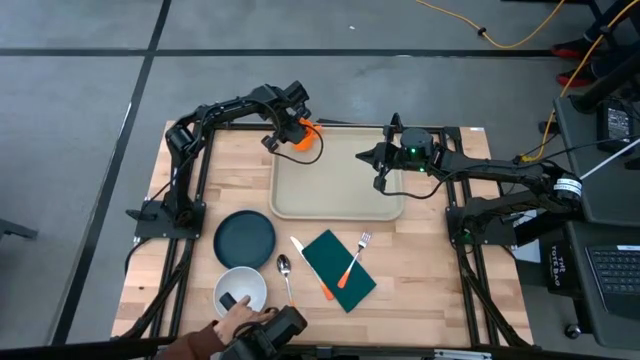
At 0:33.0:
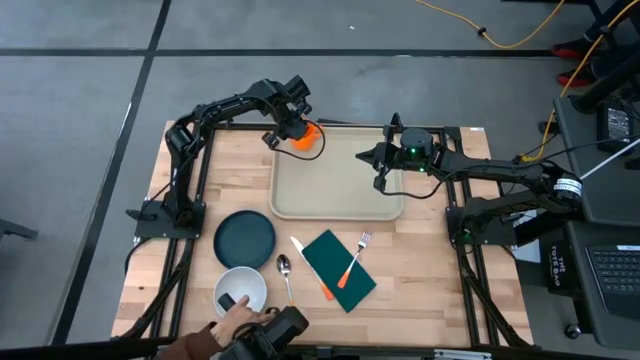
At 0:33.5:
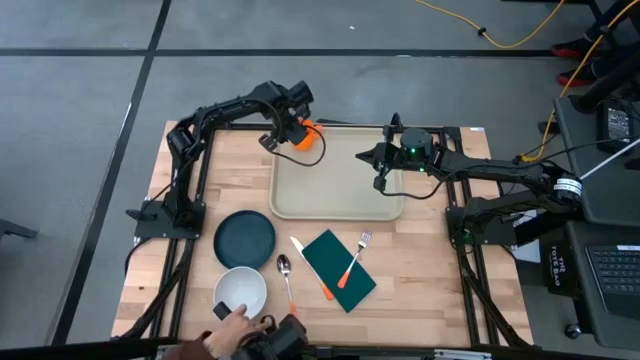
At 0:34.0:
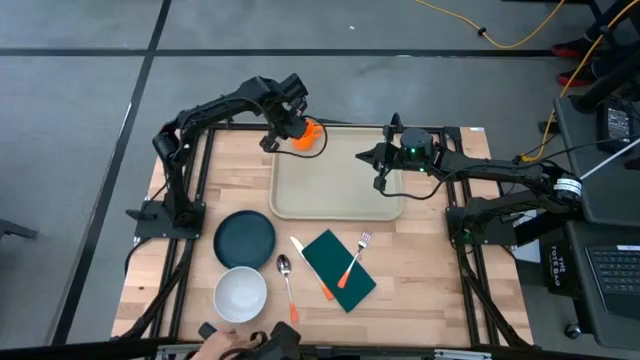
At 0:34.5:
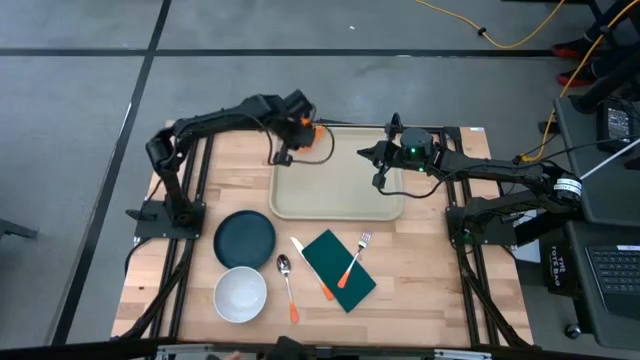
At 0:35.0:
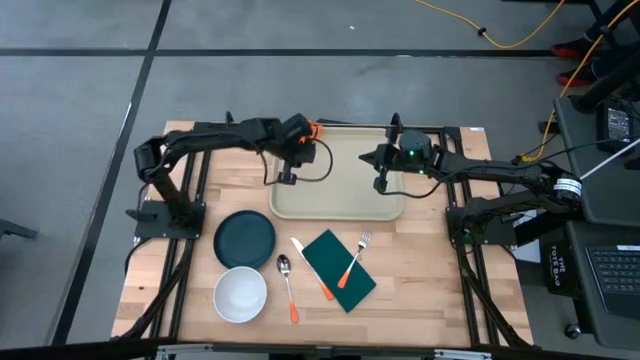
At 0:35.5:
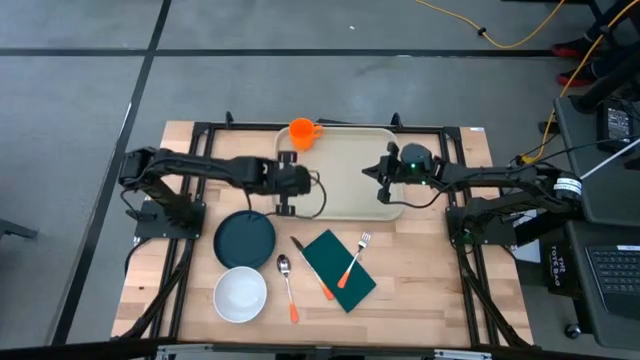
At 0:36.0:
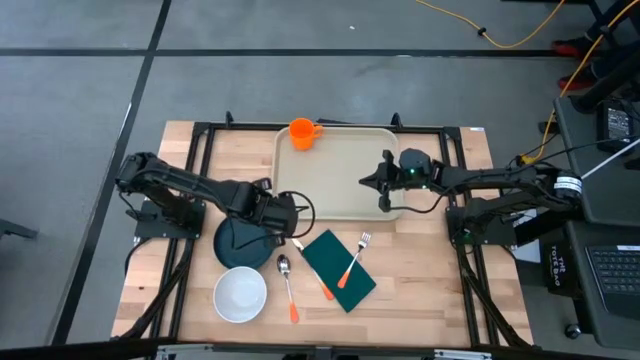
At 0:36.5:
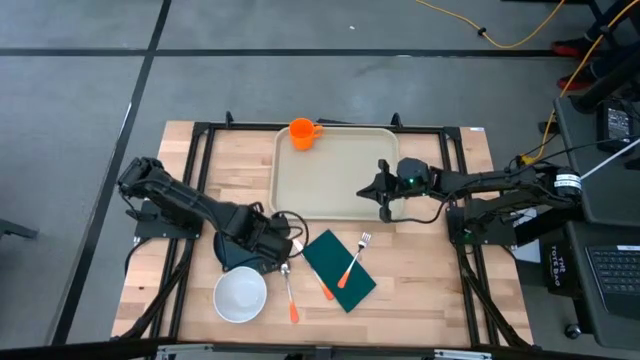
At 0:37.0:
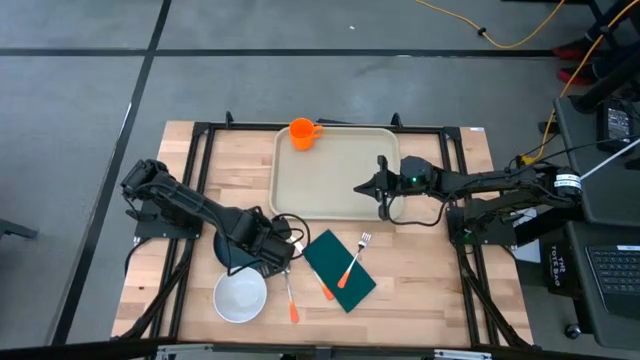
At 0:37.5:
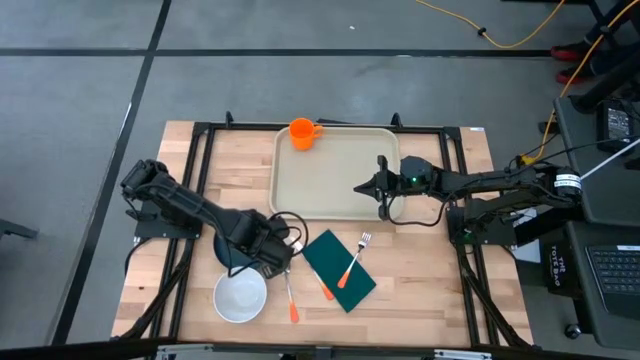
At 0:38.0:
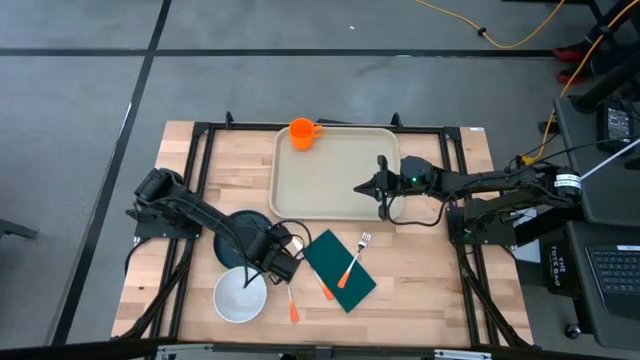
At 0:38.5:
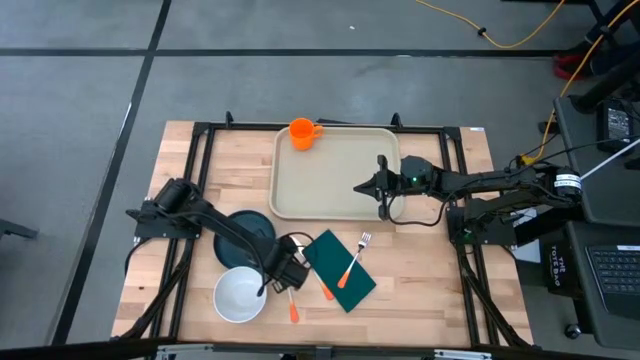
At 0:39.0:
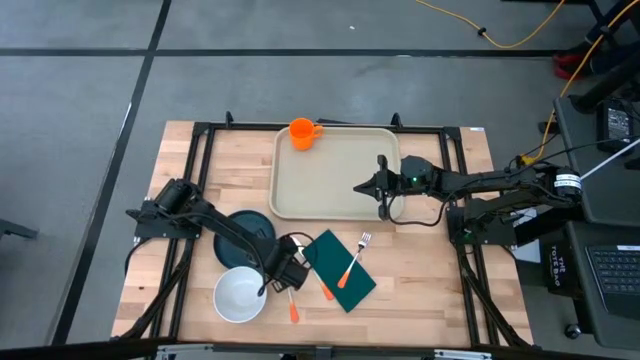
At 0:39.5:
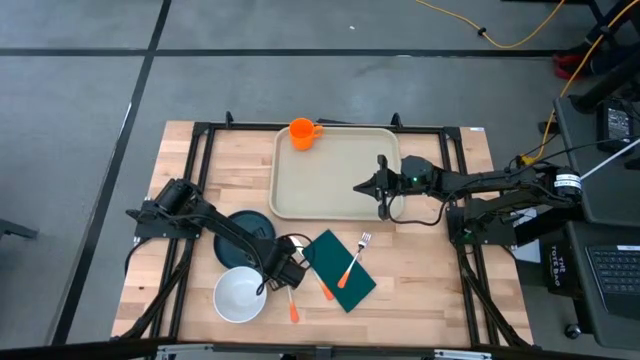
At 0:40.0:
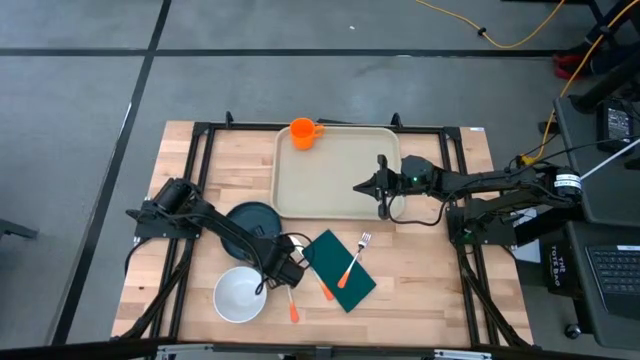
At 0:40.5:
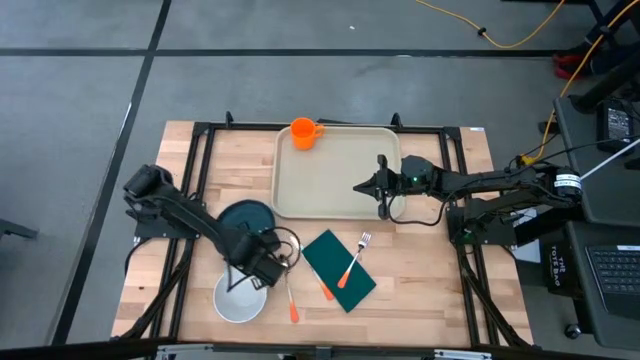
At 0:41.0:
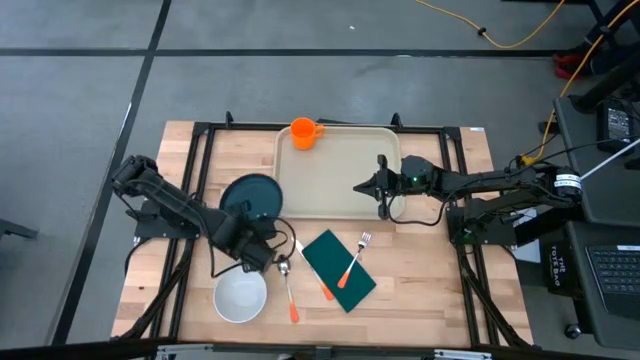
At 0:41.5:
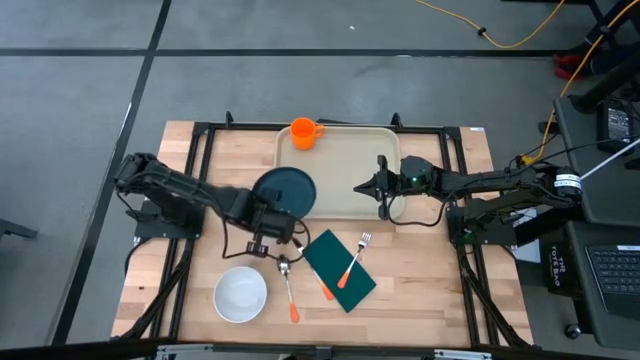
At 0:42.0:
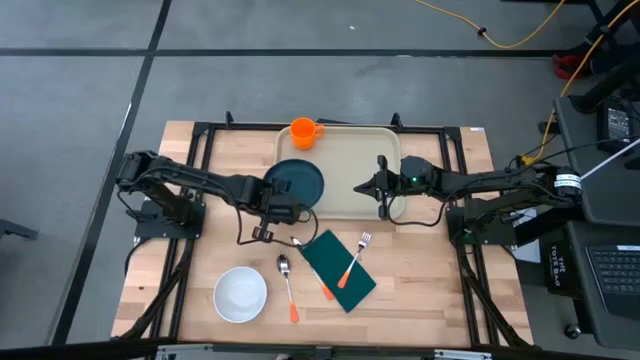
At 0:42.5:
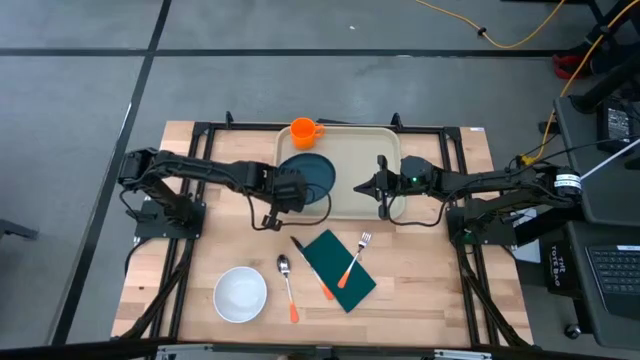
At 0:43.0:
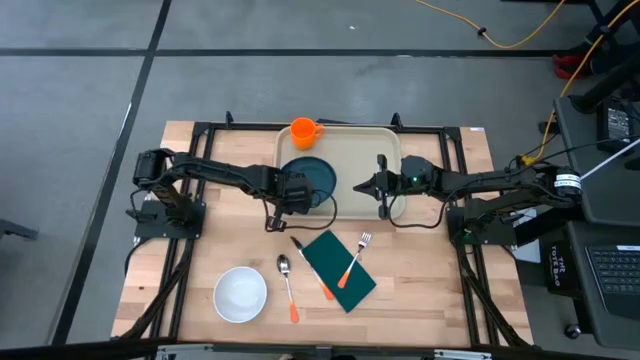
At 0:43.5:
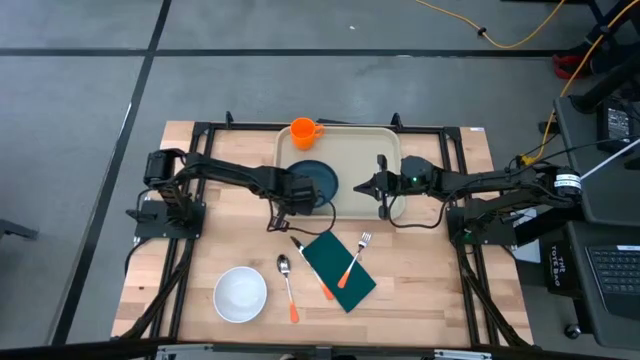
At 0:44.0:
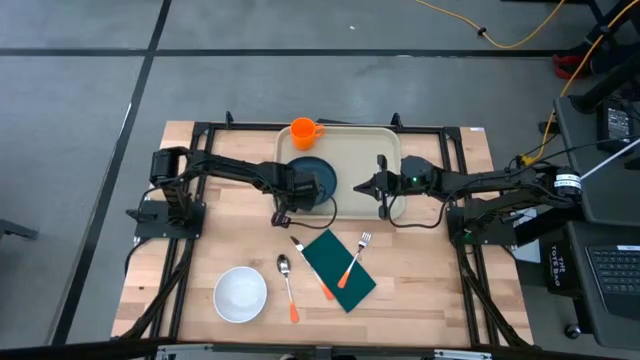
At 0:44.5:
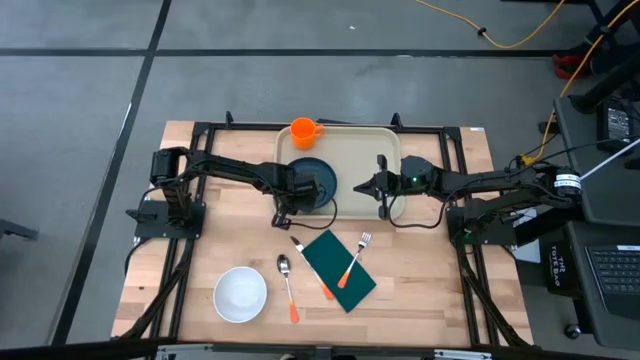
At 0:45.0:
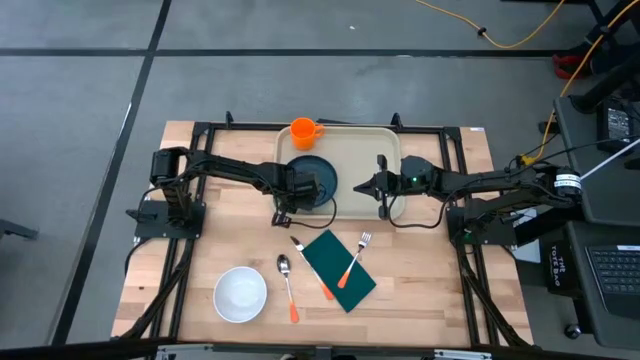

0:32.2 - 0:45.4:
Task: Set up tray
Put the blue-green plate on the gray tray

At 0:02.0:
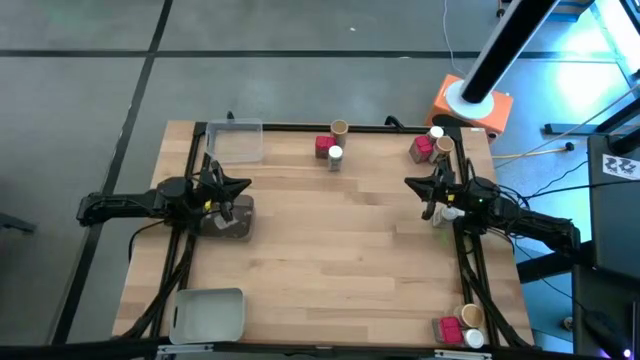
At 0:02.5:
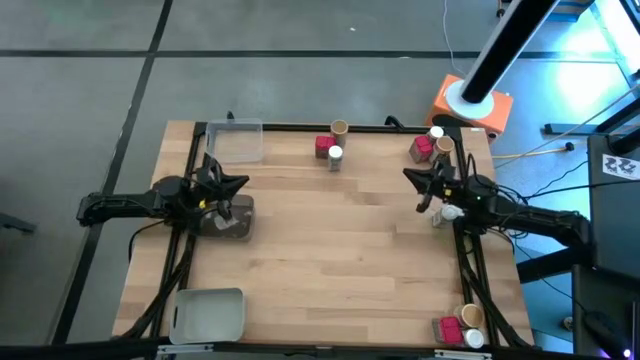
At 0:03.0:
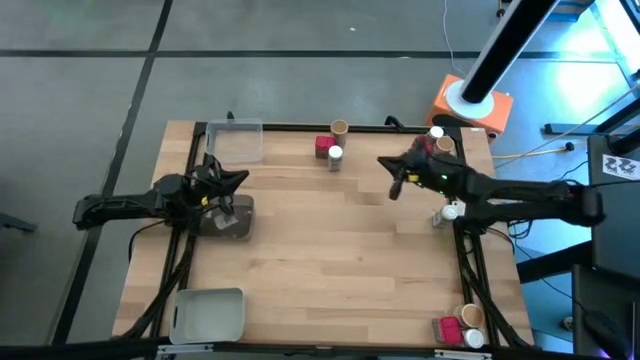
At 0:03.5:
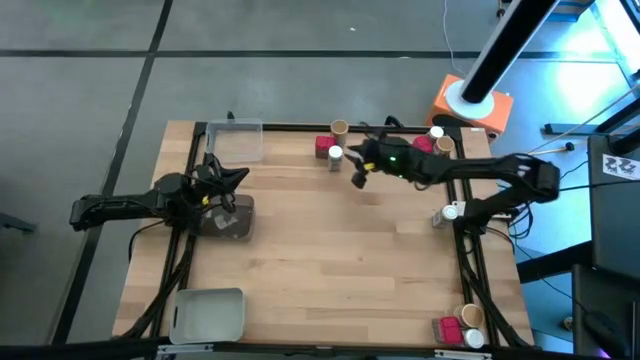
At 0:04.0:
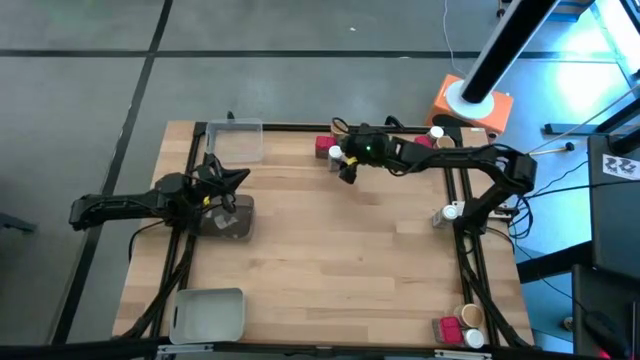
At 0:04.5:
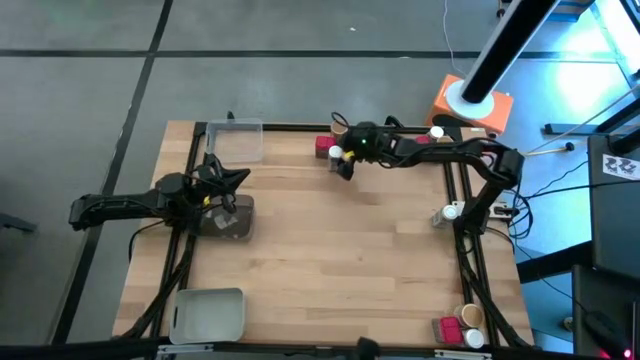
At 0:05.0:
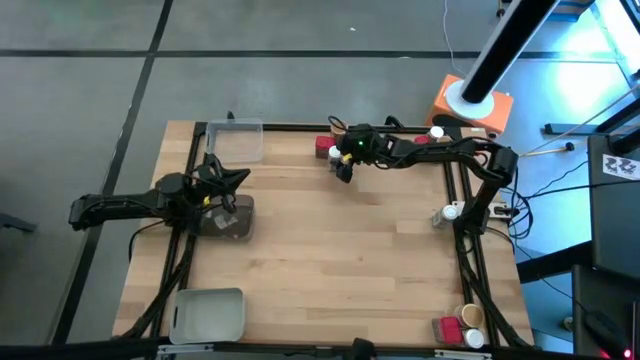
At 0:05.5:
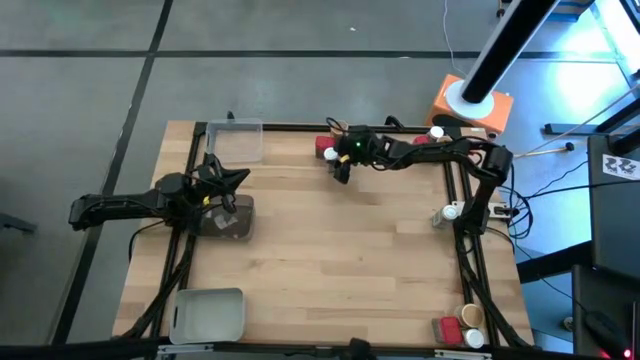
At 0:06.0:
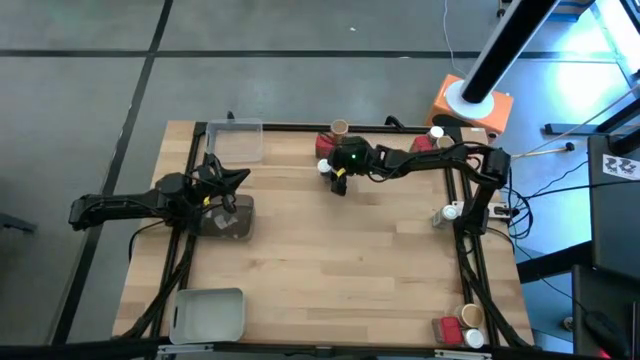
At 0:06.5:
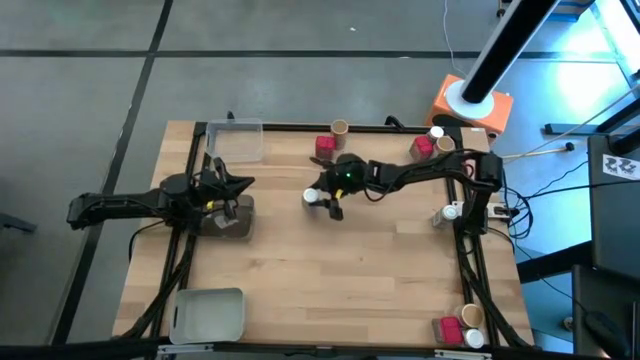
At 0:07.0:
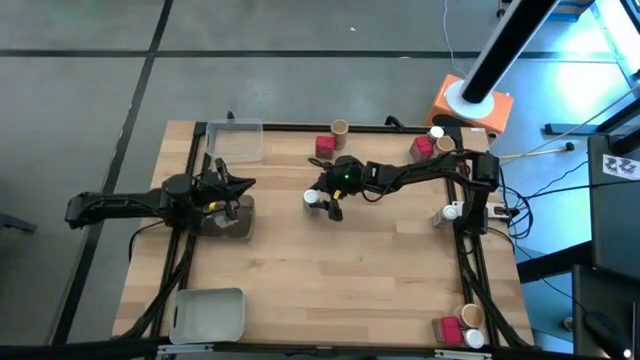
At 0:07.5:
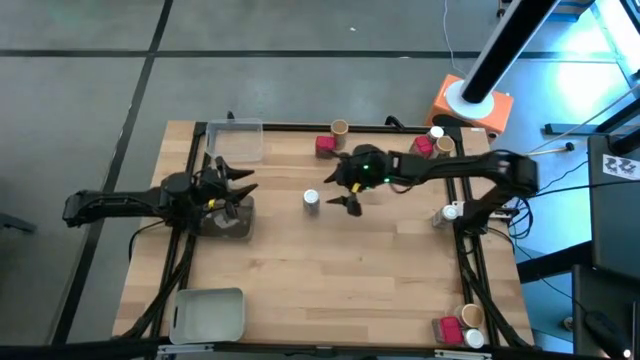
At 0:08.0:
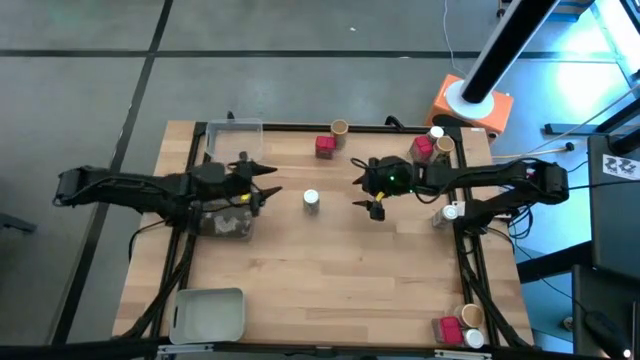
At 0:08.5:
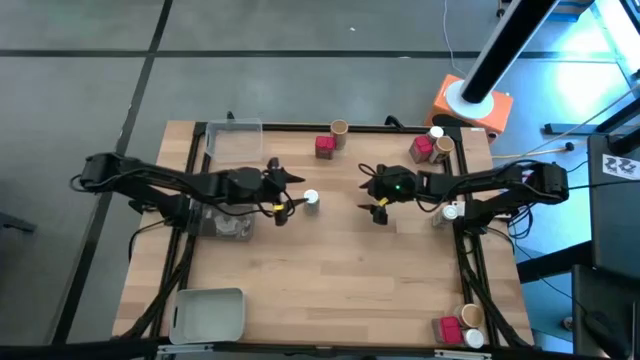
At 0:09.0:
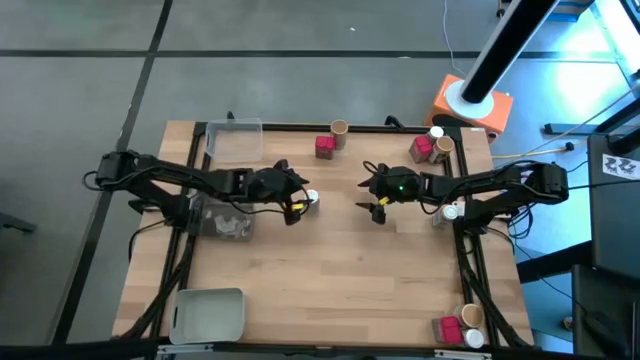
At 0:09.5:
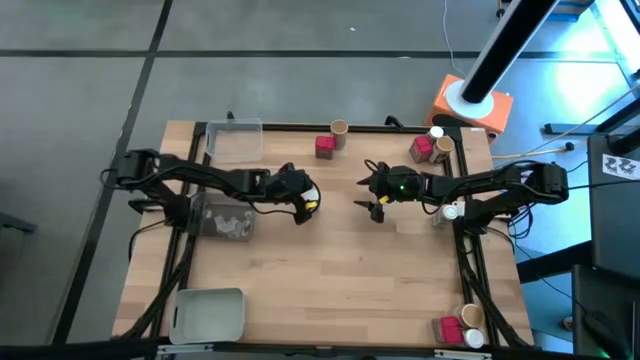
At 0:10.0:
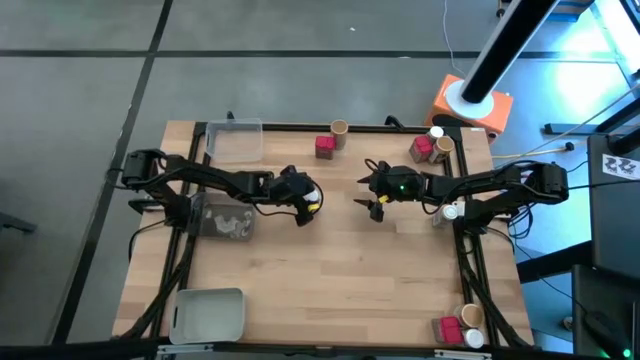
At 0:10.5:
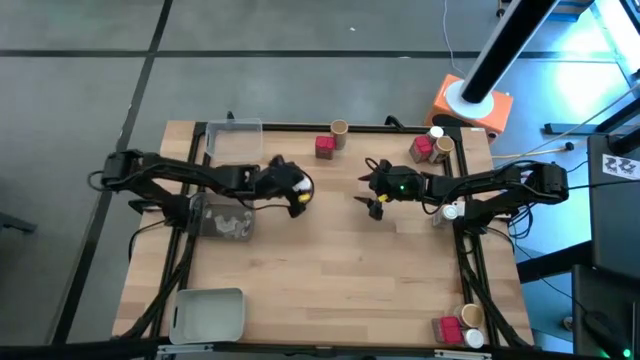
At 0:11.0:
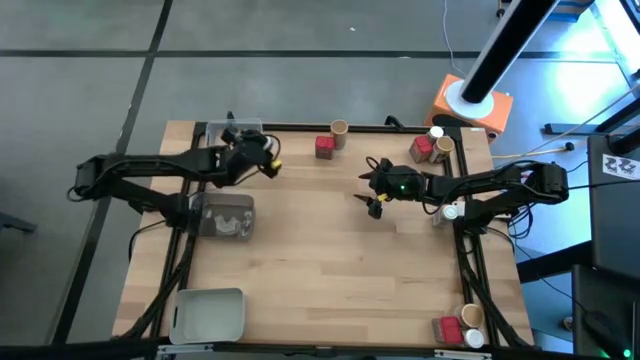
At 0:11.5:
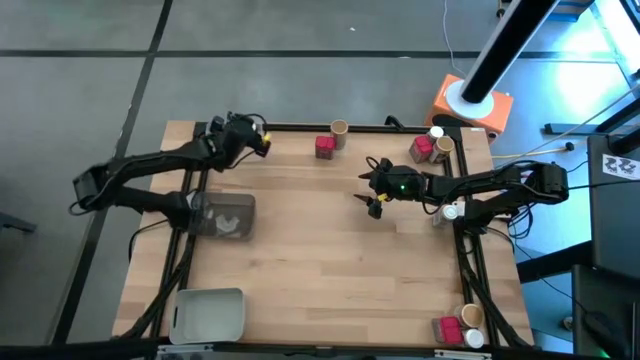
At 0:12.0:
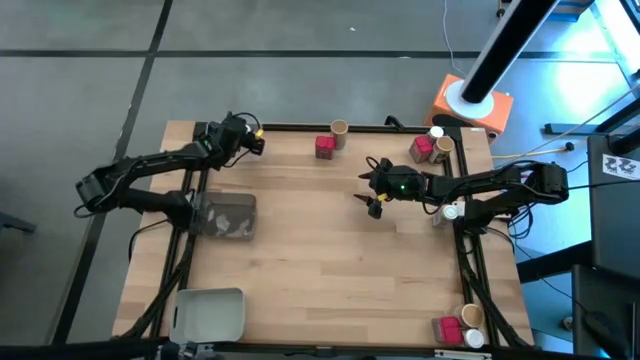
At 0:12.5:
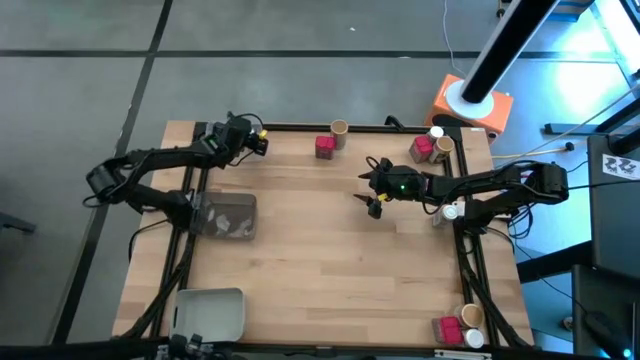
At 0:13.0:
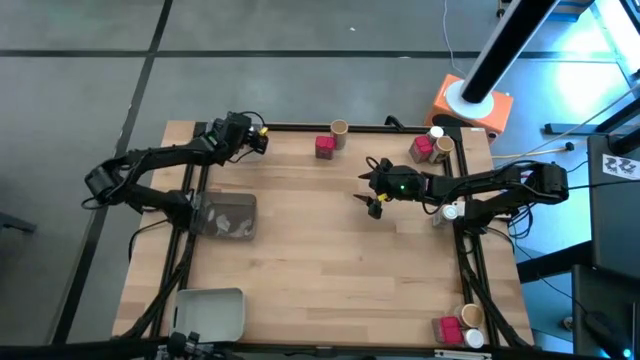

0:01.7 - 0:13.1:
Task: Sort spices by type
Put the top left white spice bottle into the transparent bin
